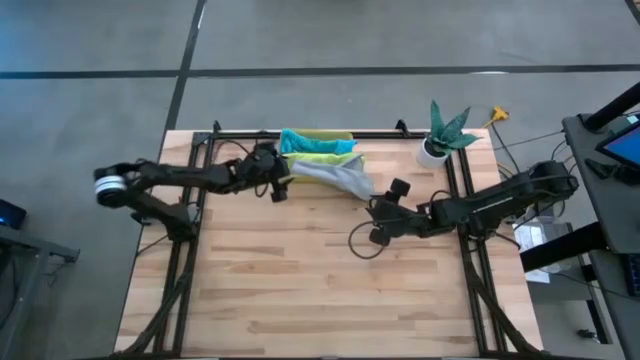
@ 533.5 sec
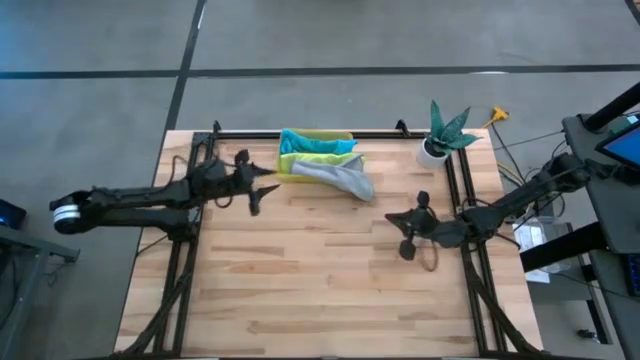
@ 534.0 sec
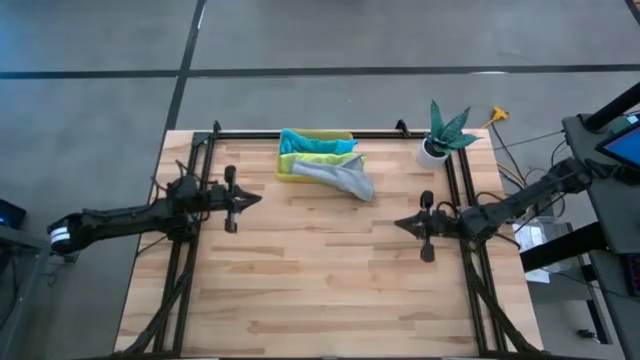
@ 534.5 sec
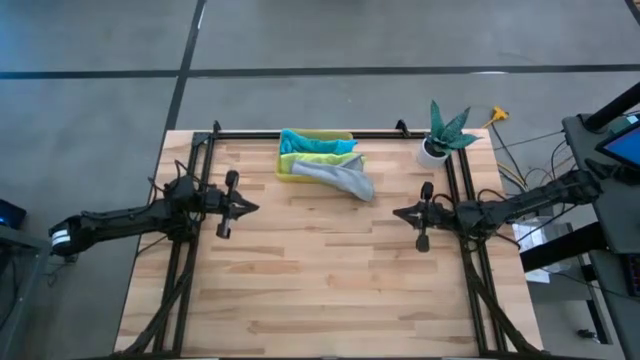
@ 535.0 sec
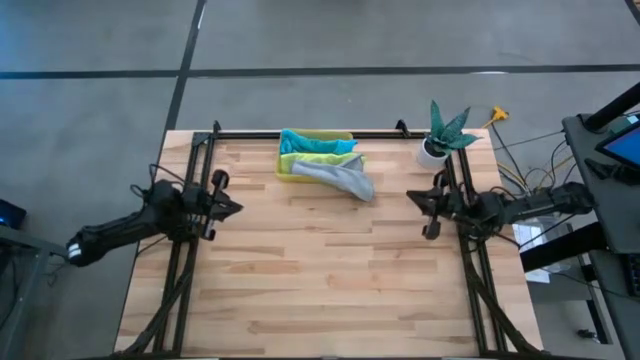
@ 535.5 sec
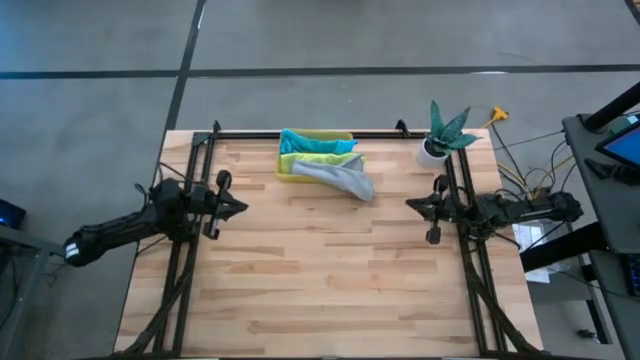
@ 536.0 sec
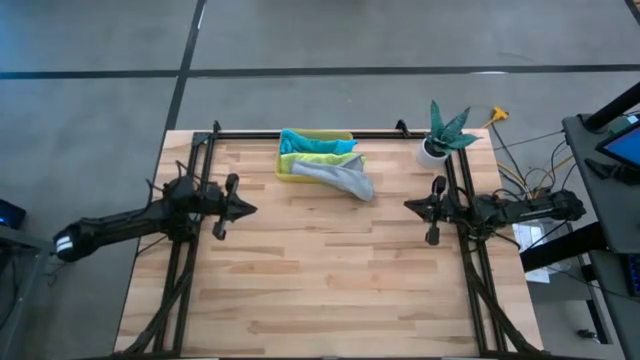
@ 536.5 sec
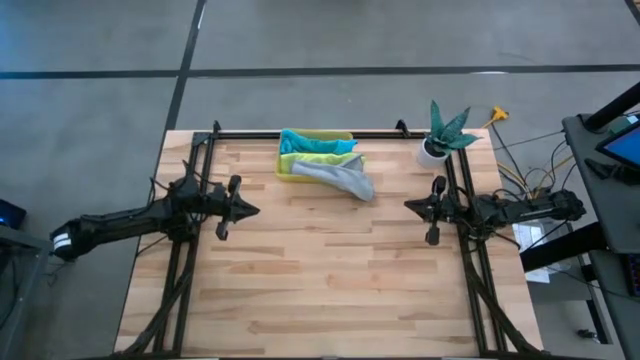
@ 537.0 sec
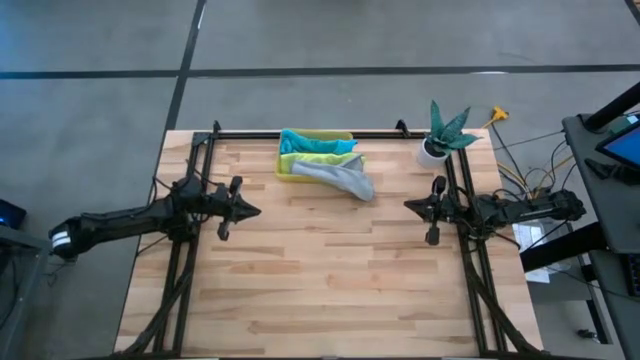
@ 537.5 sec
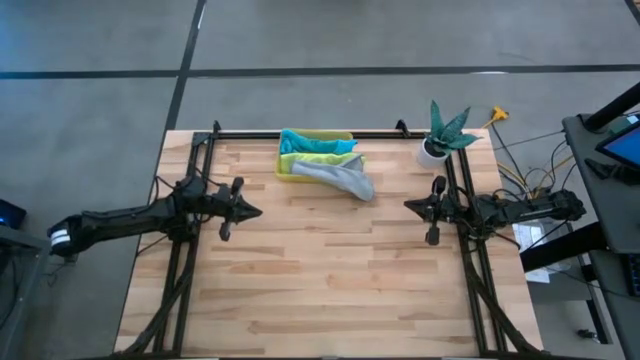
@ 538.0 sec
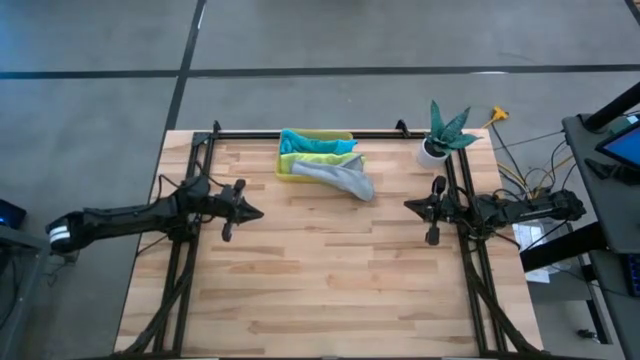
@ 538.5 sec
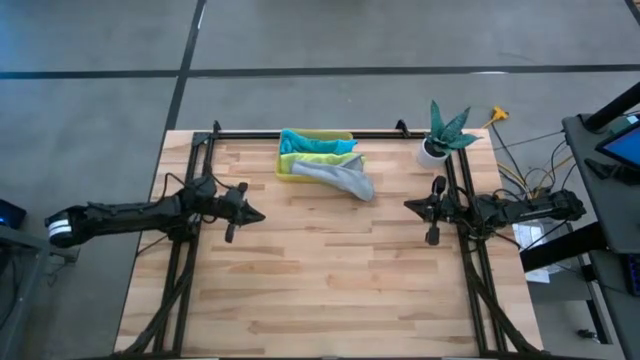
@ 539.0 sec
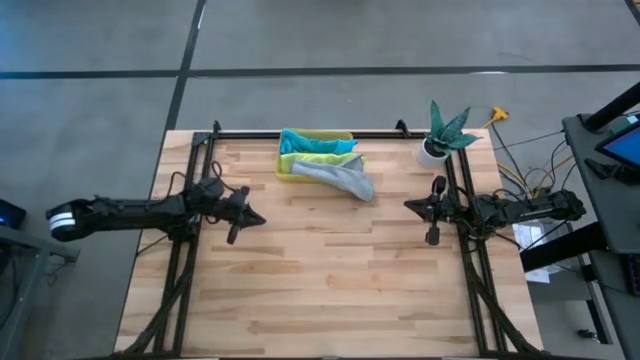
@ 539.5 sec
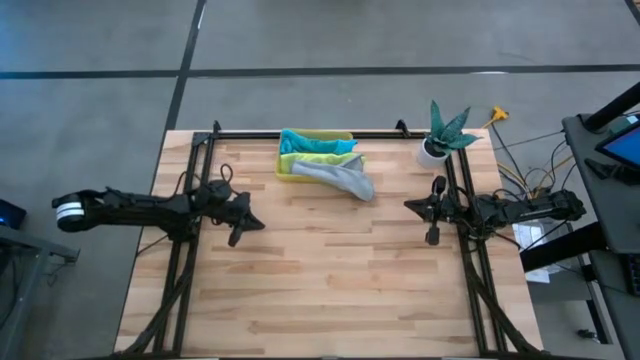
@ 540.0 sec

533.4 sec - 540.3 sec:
Task: Roll microfiber towels into tight, uniform cylinder then place into a basket
Return to Home Position

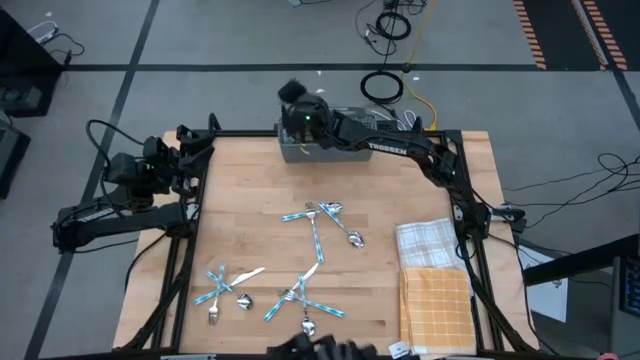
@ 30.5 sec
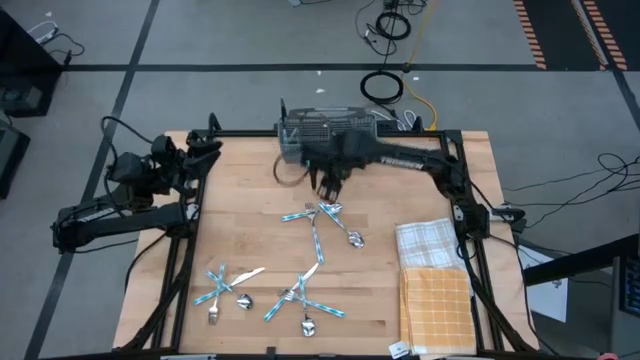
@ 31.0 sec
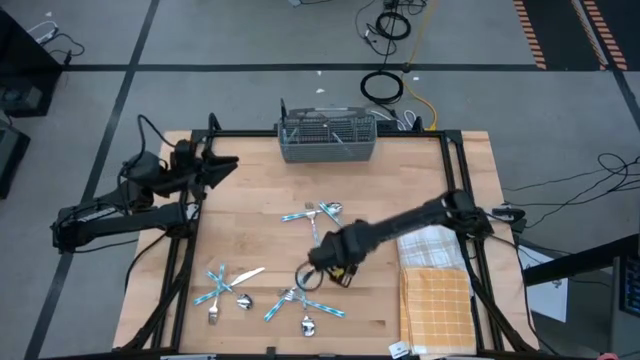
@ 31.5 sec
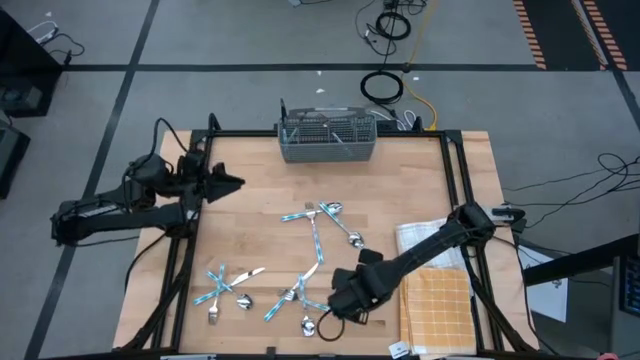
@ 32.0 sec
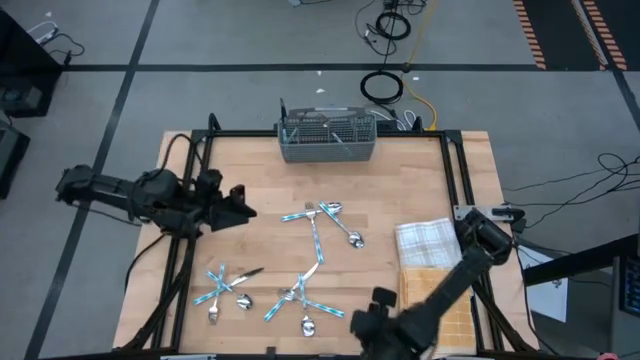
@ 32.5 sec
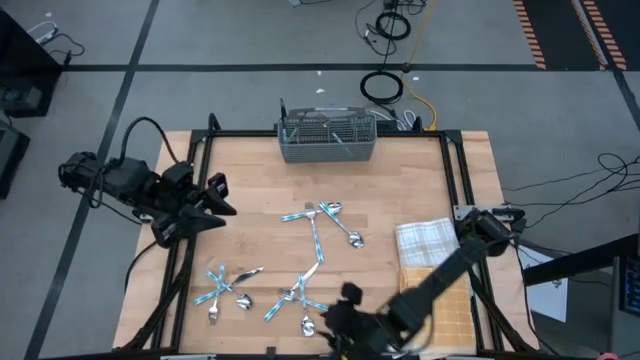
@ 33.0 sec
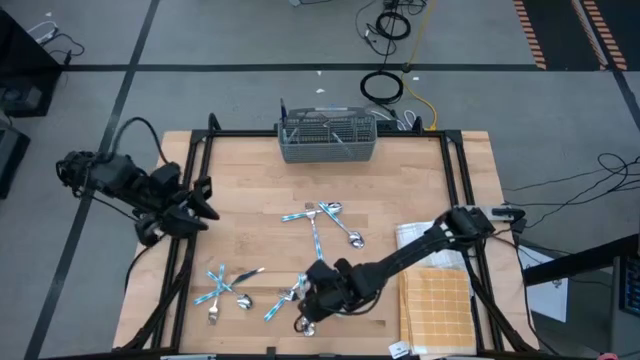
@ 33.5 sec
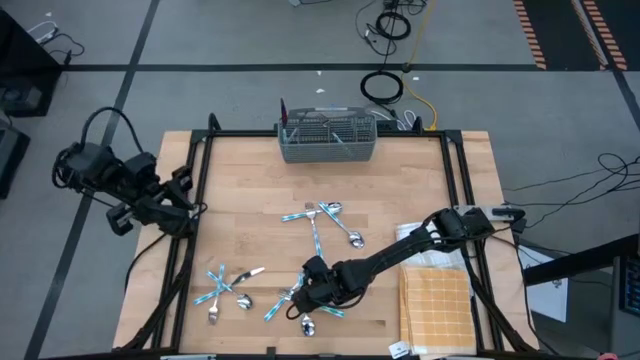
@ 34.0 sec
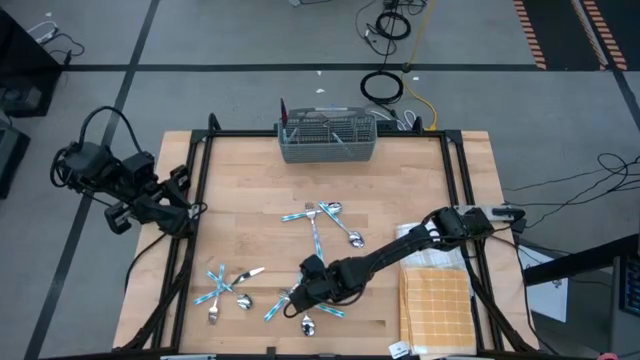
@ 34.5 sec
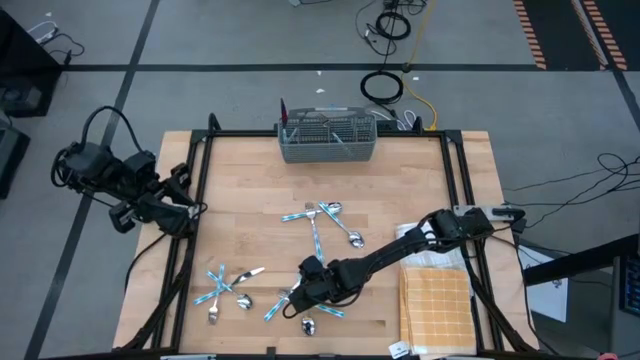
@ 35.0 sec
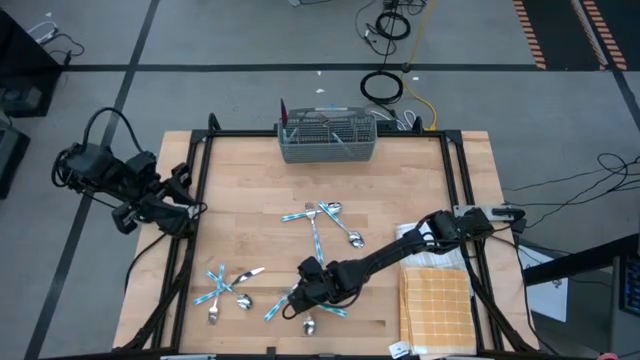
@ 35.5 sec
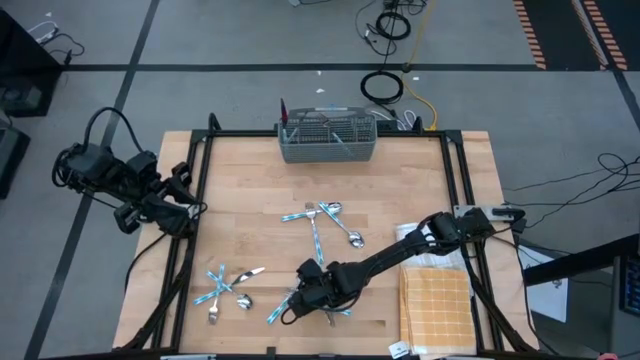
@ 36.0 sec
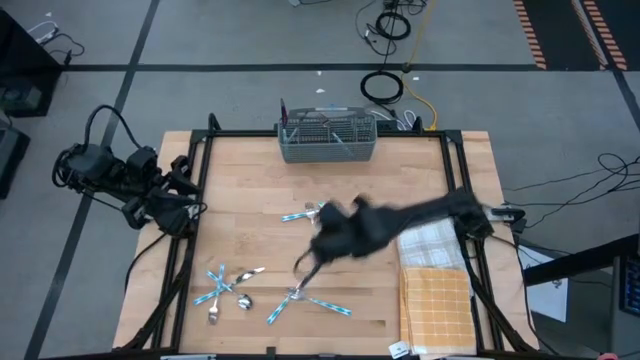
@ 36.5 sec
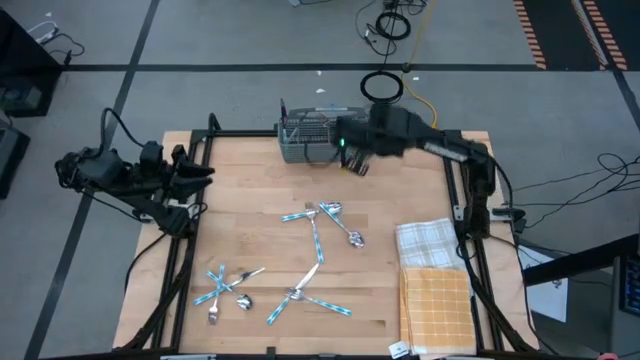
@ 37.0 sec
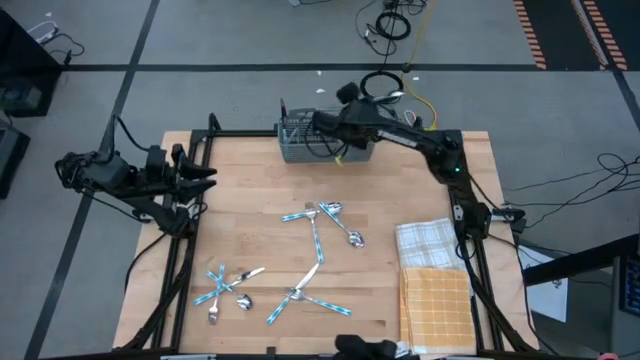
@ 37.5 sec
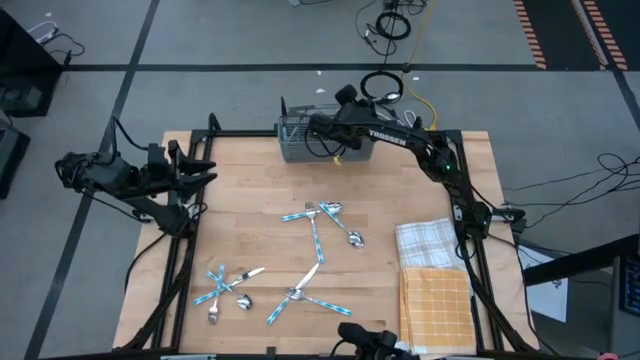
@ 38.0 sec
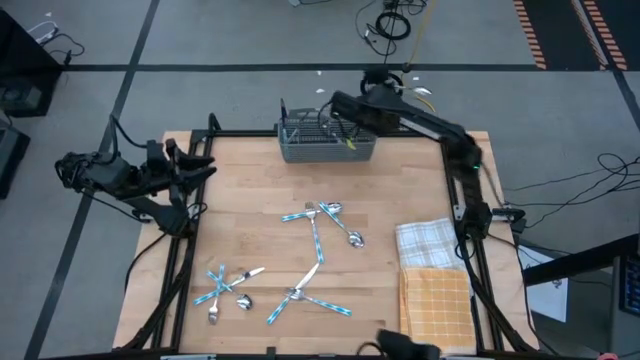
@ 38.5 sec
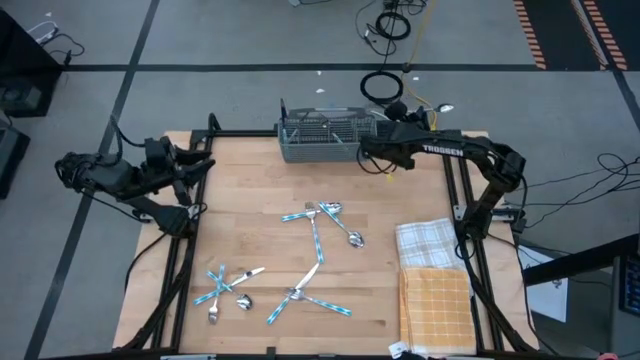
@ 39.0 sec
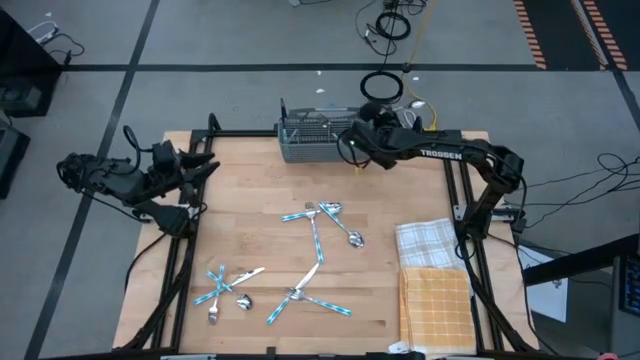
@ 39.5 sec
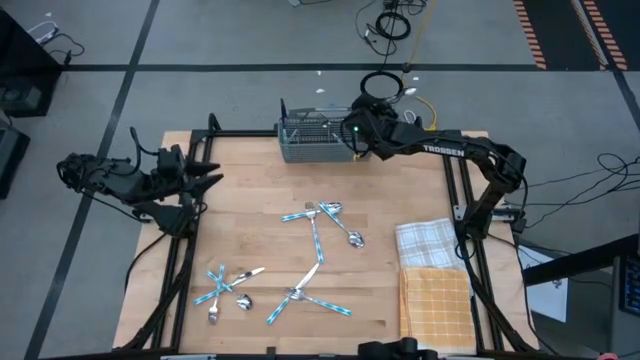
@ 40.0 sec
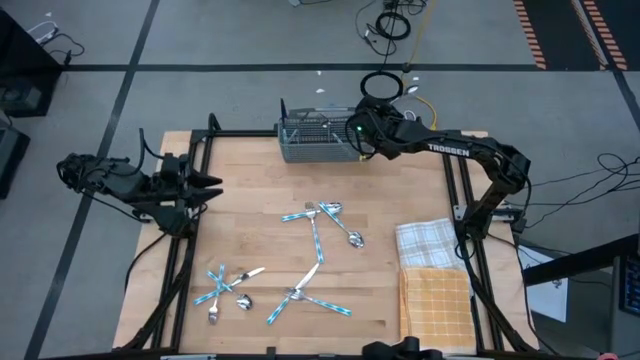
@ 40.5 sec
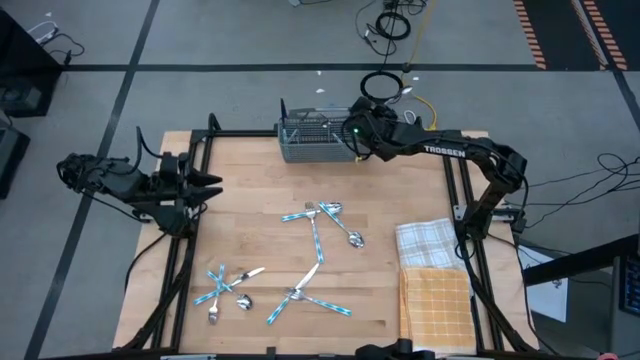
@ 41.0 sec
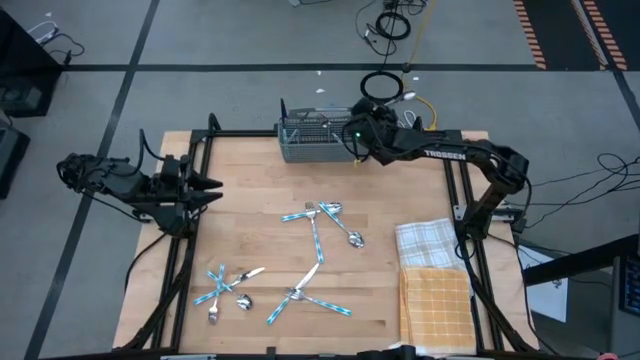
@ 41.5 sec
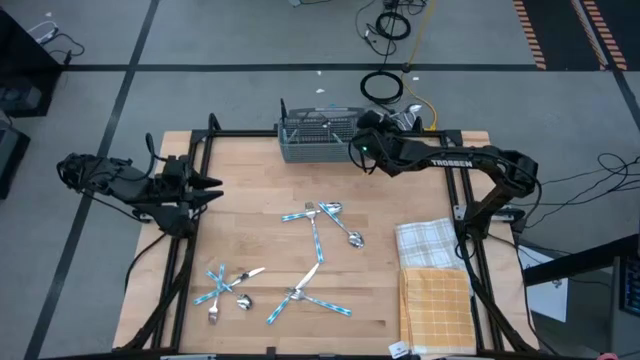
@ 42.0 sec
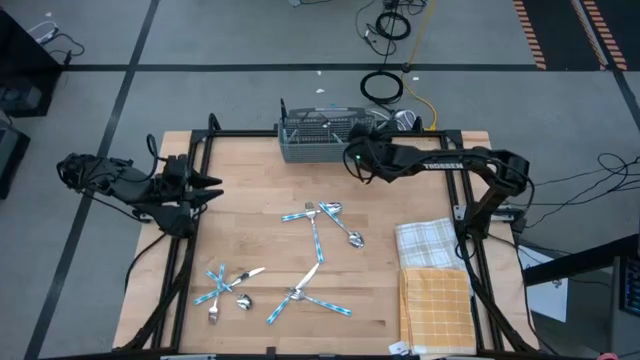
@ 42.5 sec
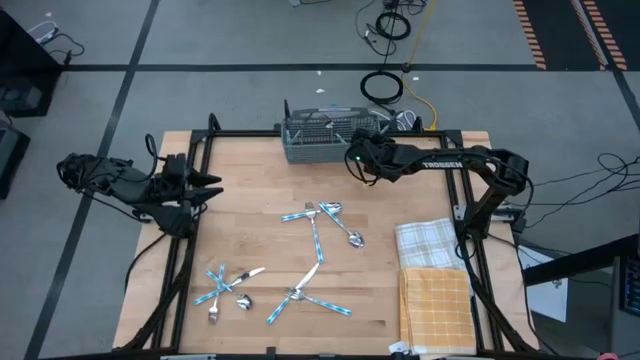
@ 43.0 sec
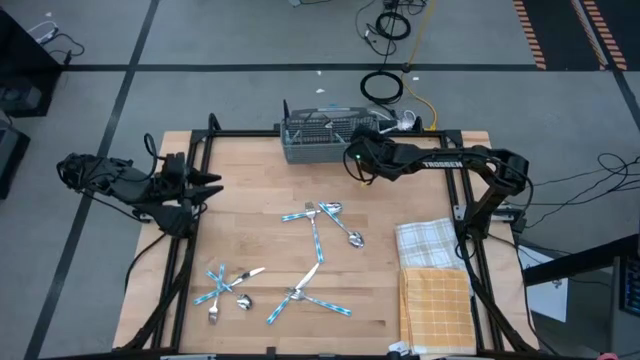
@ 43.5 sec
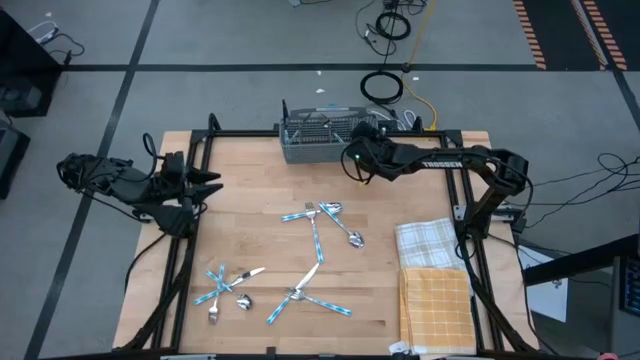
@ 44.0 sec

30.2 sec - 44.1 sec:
Task: Sort silverware
Put the spoon into the silverware rack
